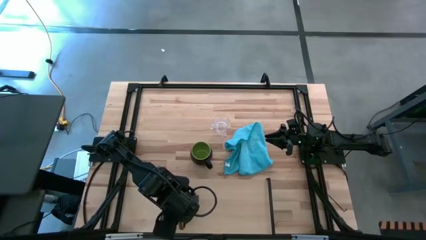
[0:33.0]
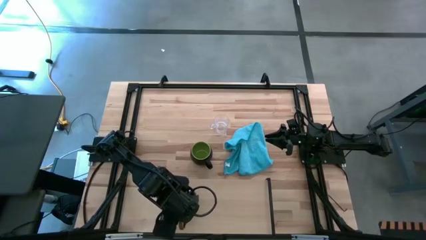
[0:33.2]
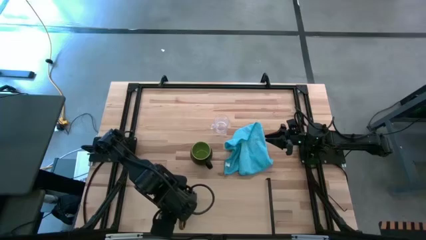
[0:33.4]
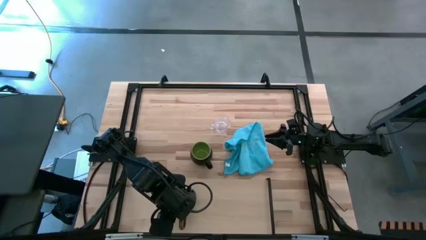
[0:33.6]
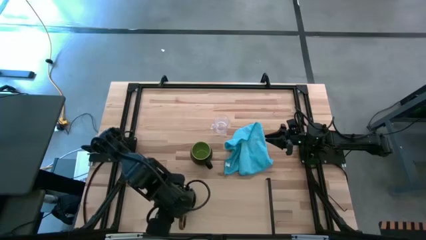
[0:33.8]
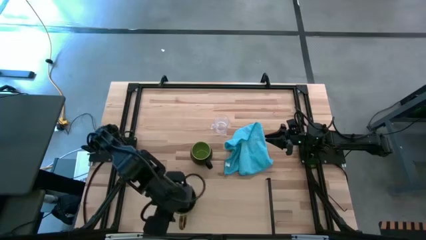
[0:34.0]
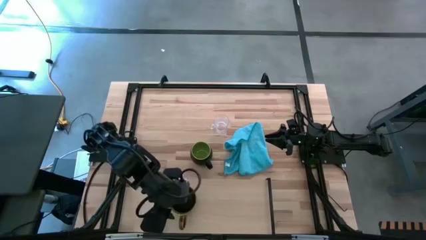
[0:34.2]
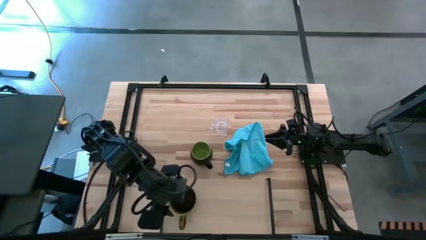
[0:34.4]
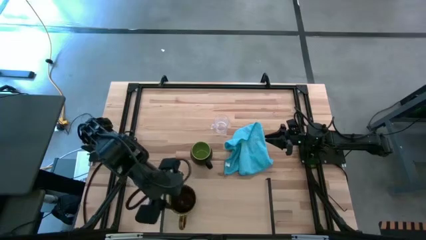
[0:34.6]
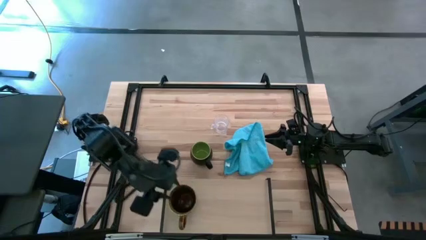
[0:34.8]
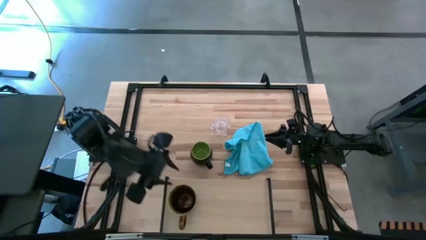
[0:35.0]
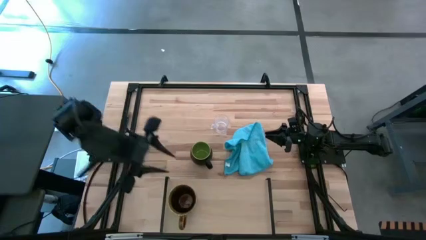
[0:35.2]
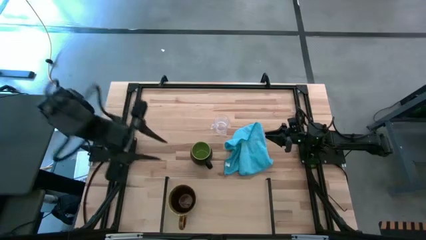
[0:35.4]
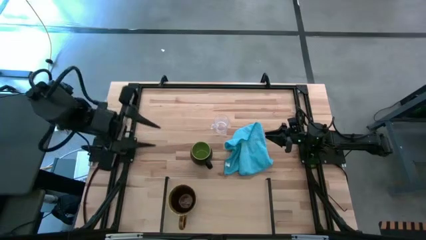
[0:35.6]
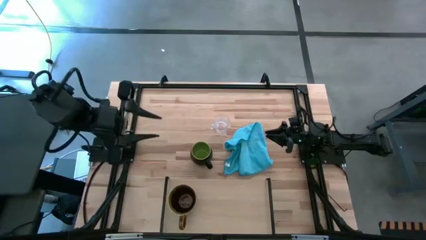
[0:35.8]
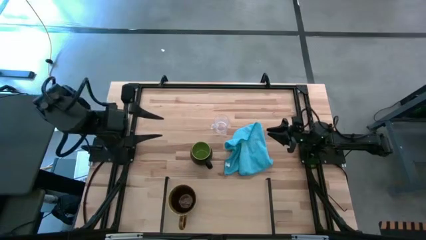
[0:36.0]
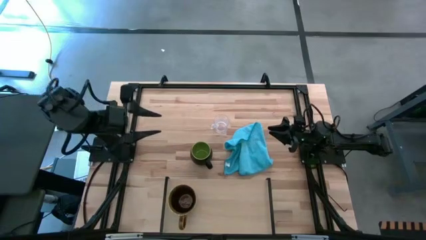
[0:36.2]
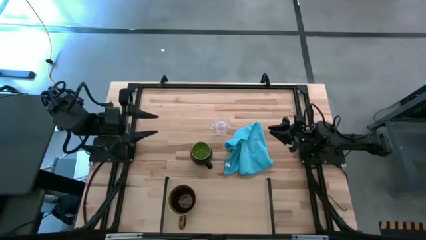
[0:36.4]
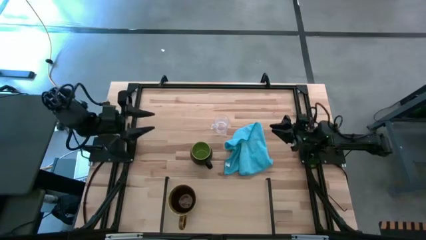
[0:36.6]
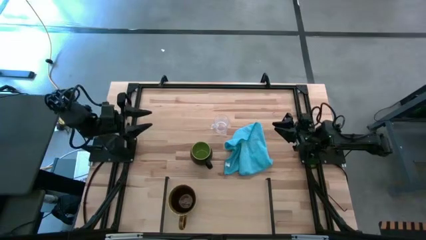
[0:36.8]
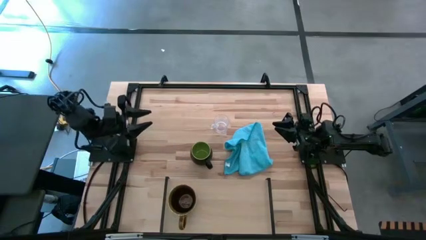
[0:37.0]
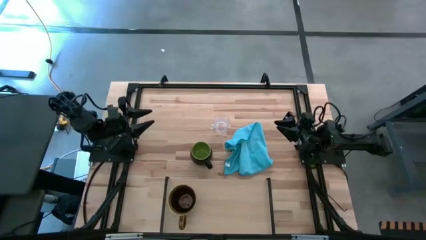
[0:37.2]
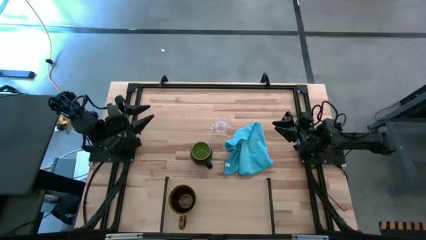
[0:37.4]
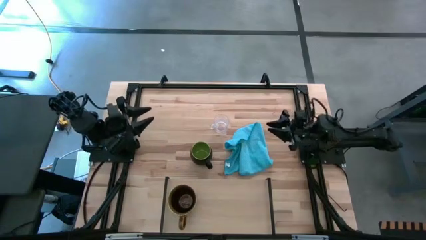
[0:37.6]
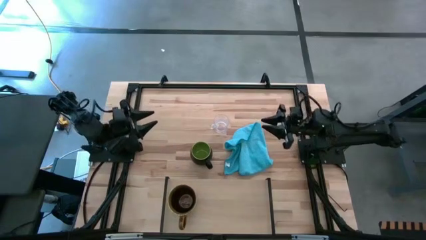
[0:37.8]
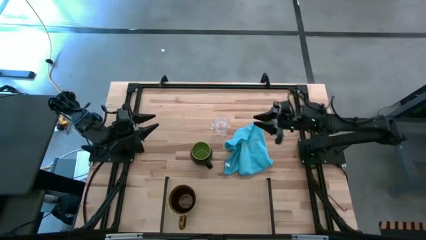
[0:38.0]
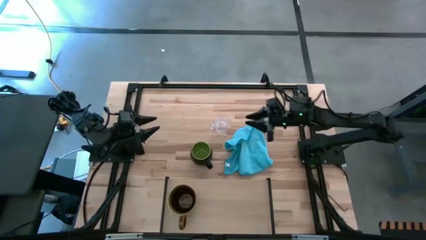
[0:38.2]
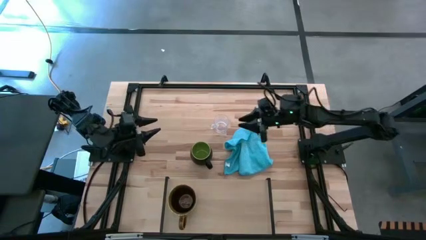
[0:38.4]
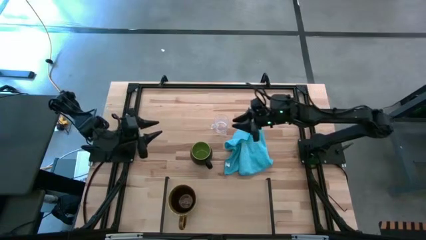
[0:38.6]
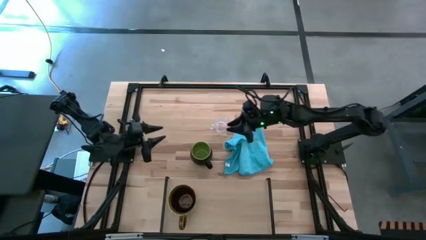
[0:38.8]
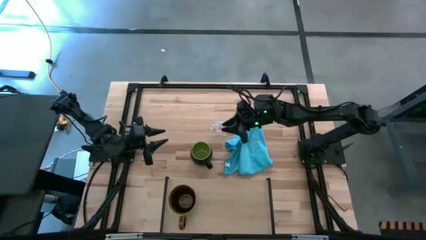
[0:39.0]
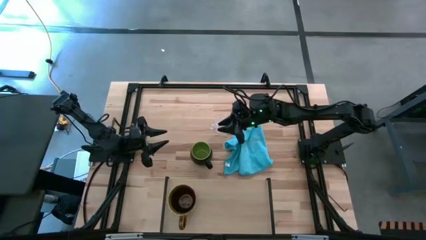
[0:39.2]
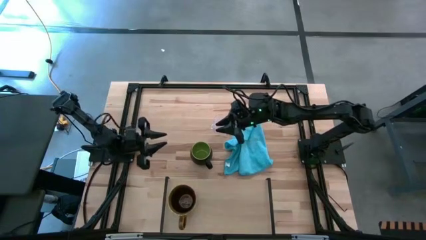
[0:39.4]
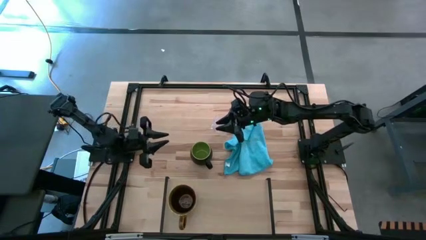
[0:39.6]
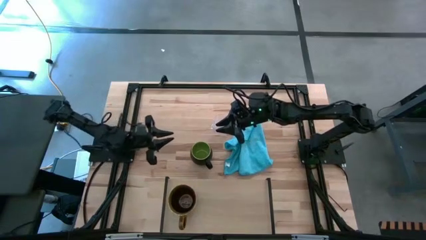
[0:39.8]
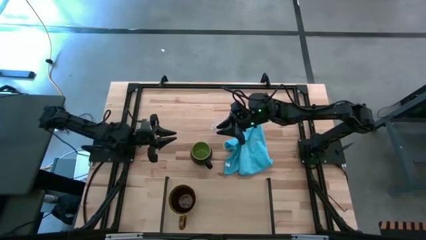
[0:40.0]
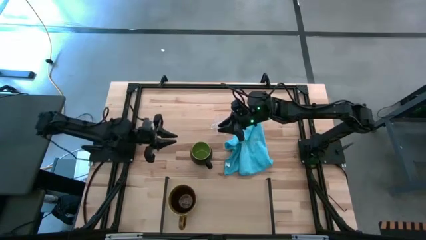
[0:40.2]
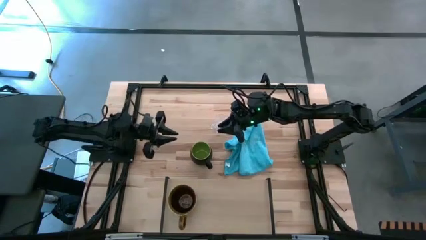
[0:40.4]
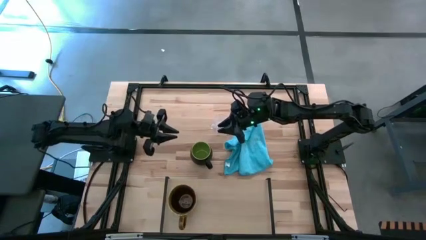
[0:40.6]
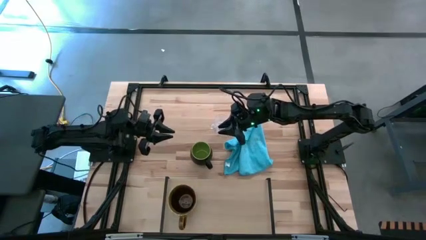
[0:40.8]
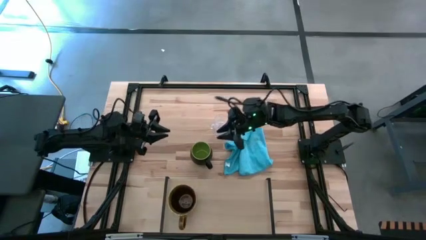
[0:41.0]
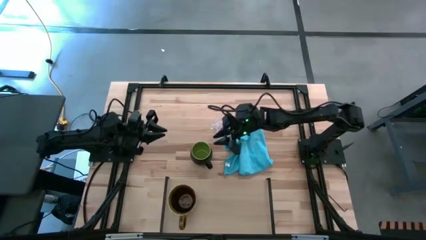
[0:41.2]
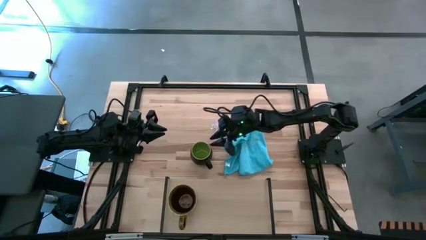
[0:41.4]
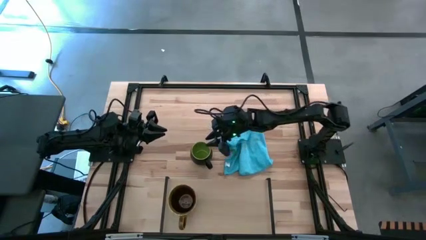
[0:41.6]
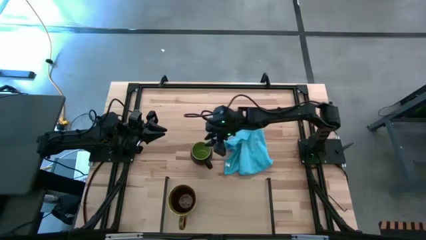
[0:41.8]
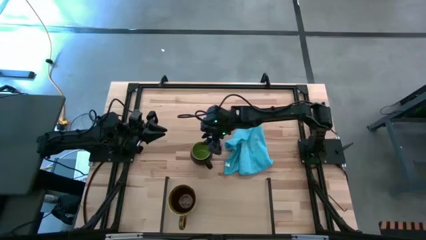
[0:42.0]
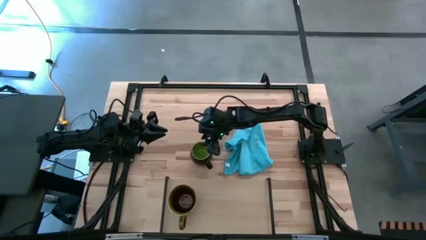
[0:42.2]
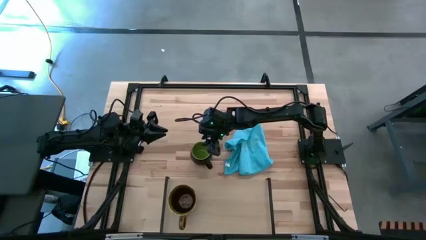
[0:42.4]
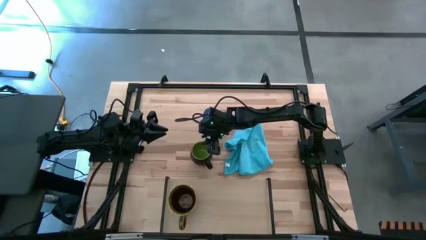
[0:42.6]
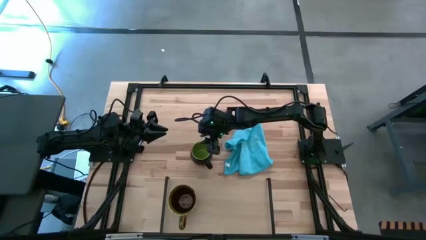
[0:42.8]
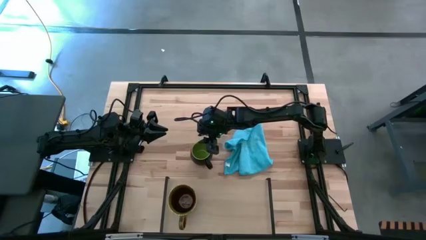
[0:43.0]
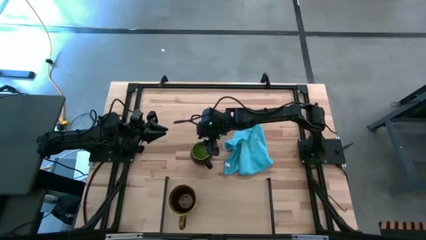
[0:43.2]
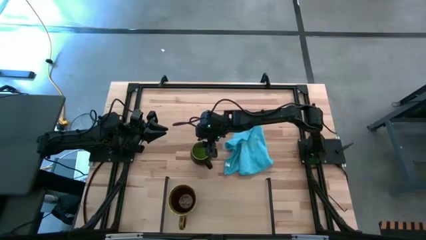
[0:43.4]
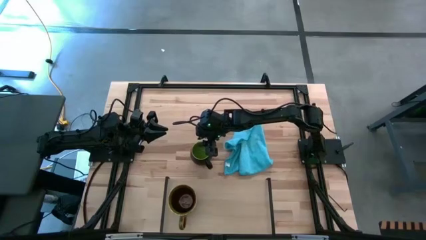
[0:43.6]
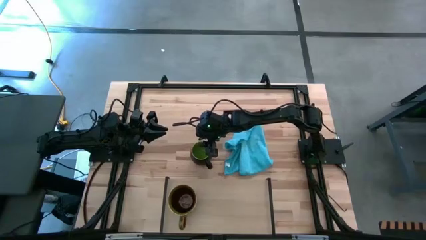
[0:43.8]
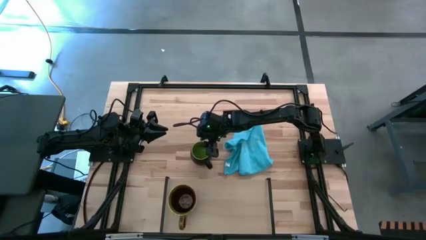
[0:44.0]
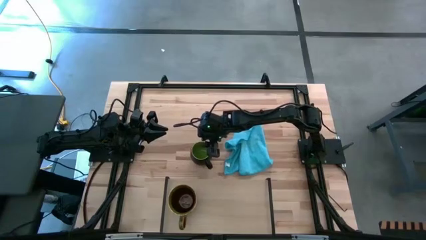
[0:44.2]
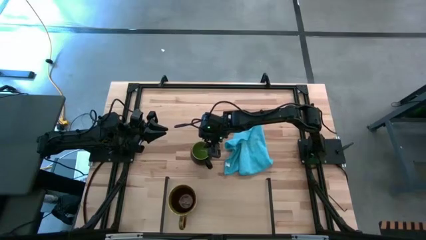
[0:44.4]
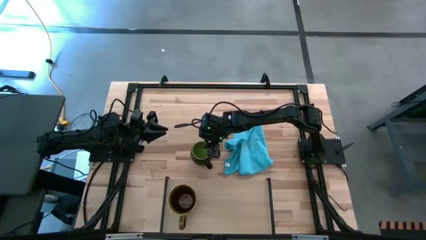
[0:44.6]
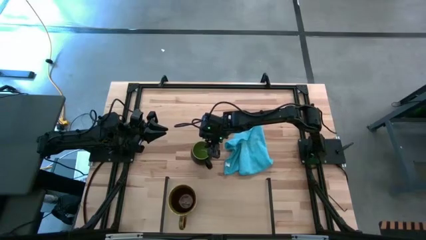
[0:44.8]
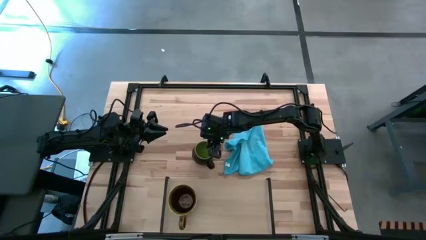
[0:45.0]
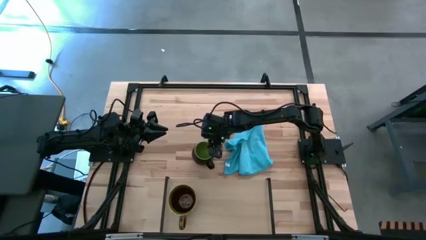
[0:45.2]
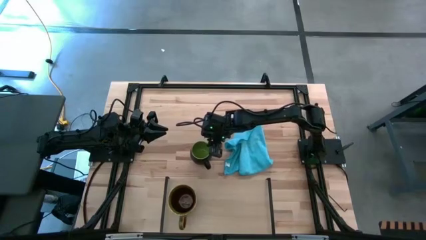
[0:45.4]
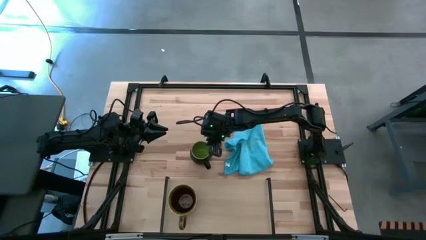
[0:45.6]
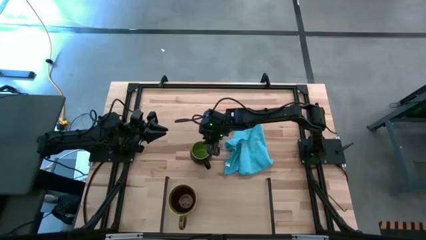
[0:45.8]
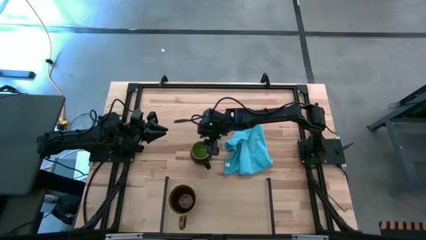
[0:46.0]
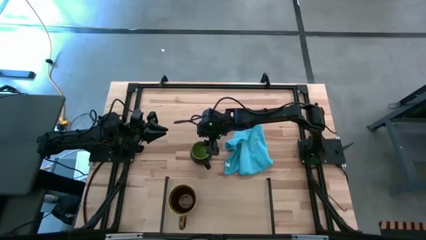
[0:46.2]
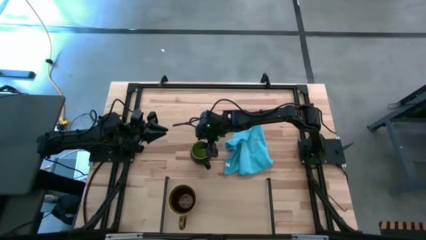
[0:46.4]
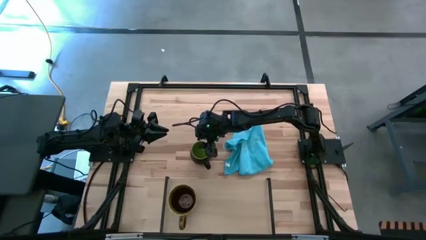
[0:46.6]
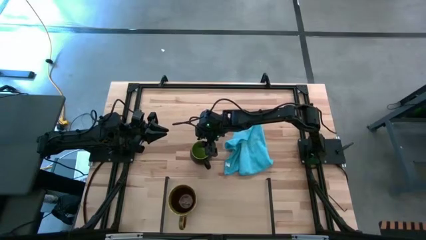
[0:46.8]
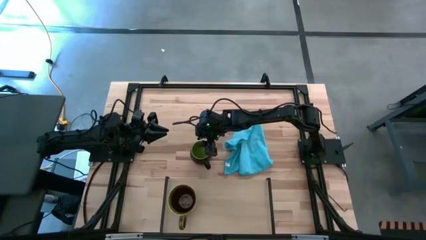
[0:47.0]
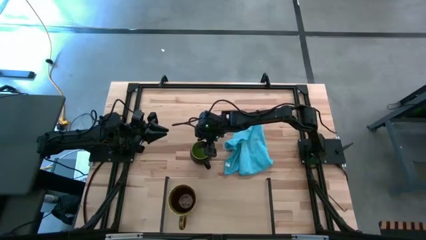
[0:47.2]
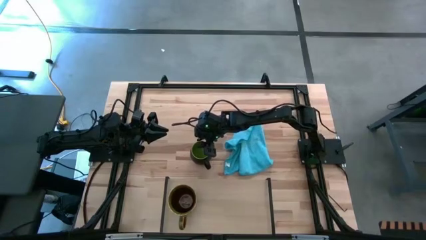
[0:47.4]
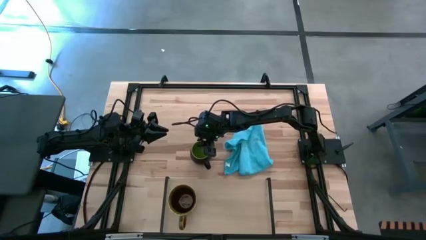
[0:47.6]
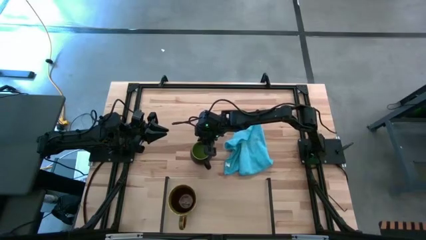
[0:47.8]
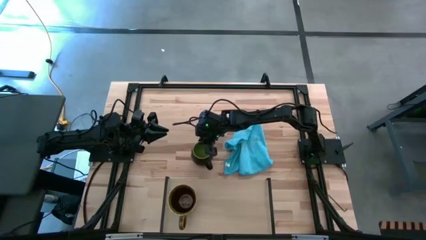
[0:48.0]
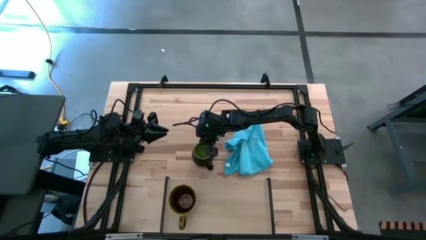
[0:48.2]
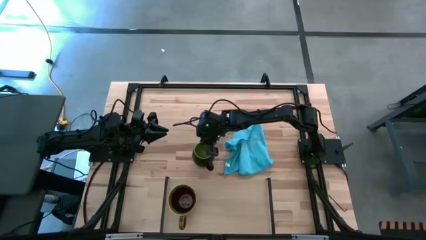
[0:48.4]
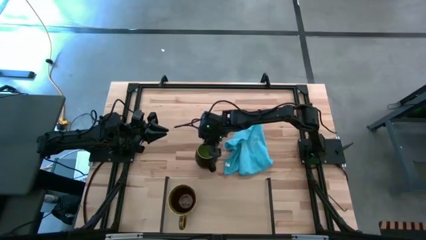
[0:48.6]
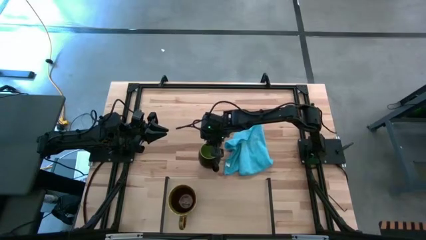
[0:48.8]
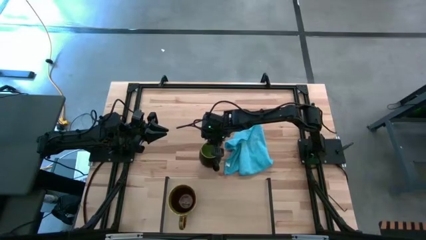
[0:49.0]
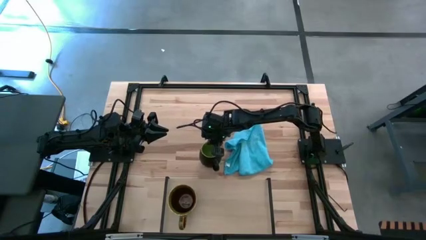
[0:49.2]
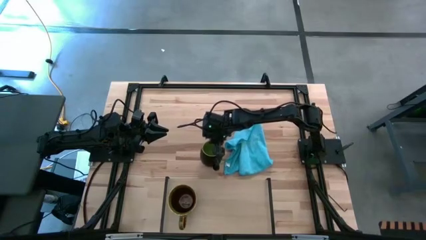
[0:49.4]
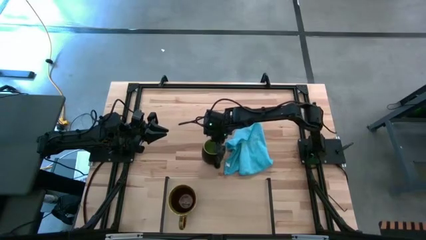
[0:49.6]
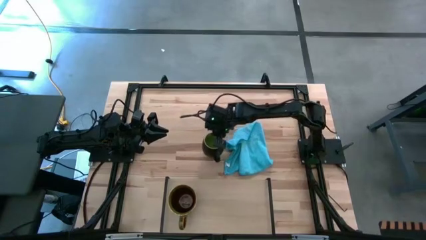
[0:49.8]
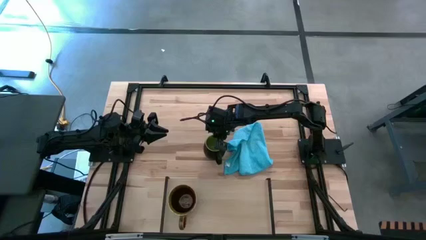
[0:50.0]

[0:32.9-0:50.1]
Task: Stack small to large cups/mugs on shelf
Put the black green mug on the shelf
